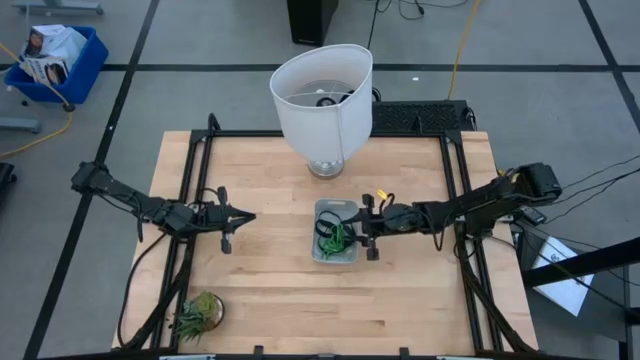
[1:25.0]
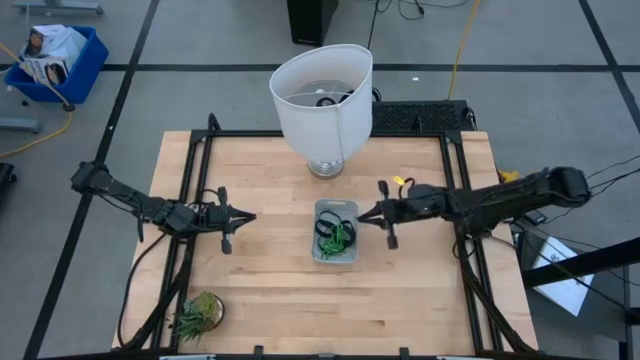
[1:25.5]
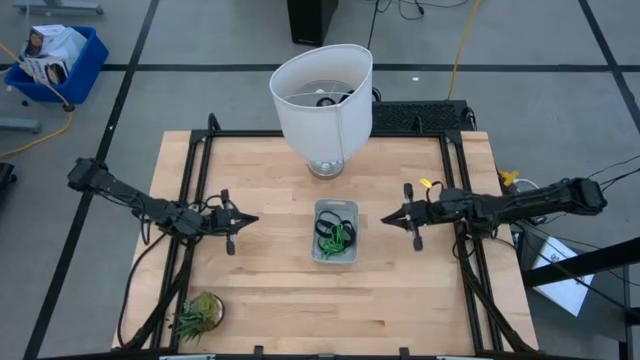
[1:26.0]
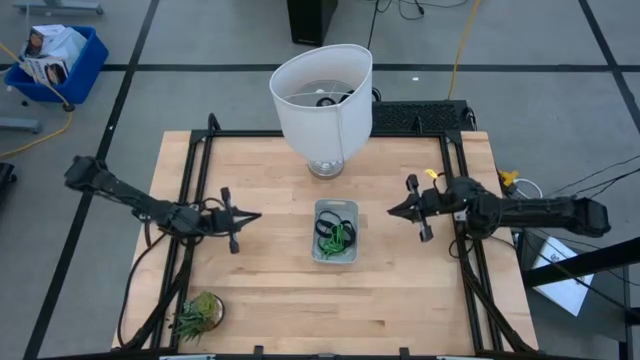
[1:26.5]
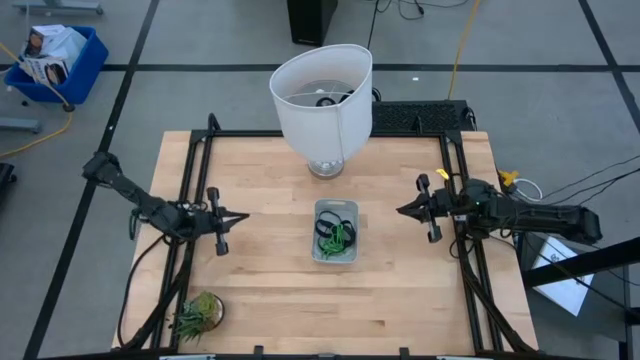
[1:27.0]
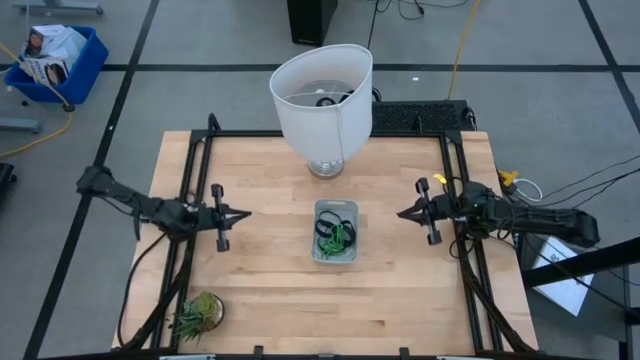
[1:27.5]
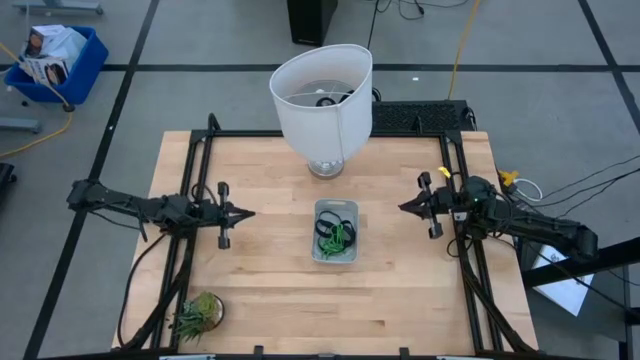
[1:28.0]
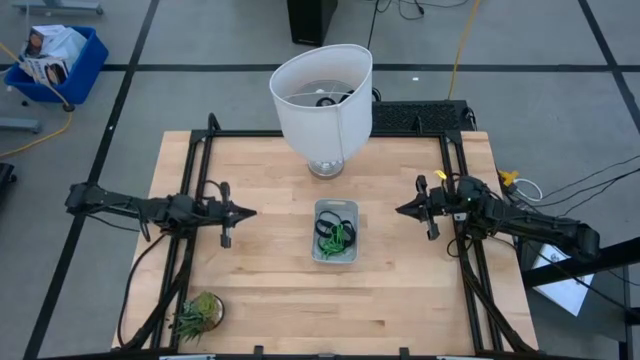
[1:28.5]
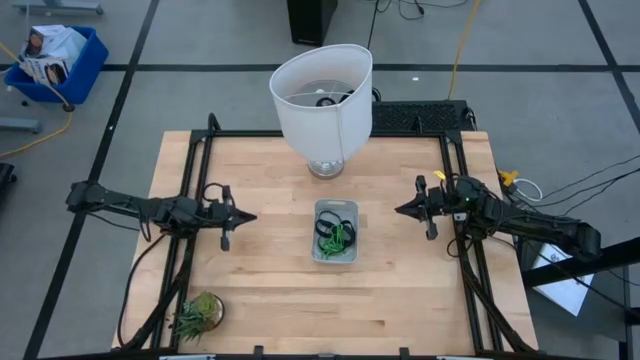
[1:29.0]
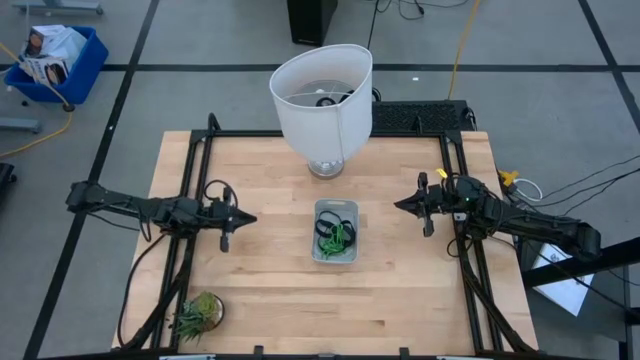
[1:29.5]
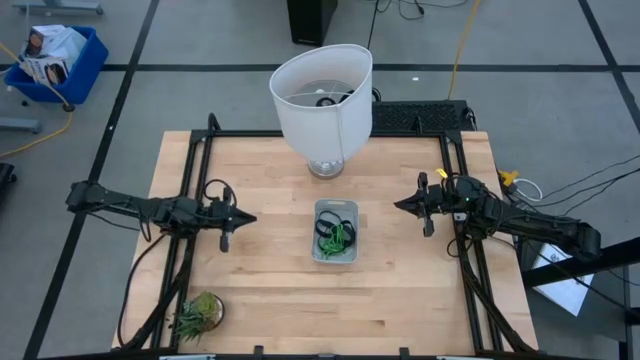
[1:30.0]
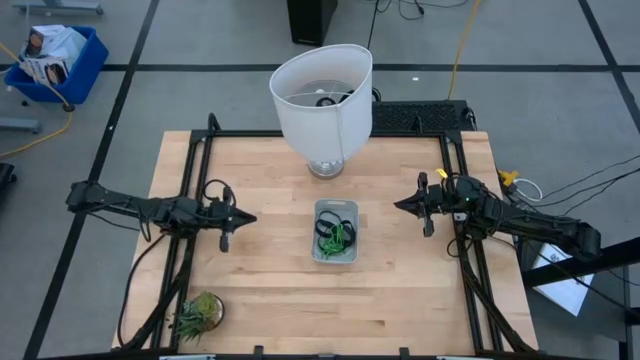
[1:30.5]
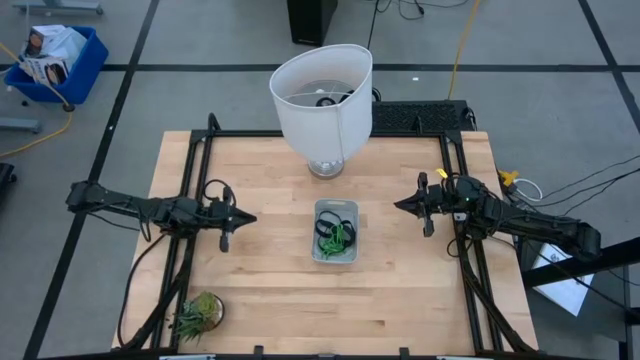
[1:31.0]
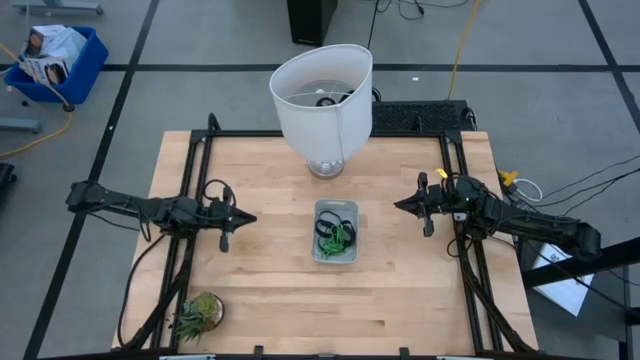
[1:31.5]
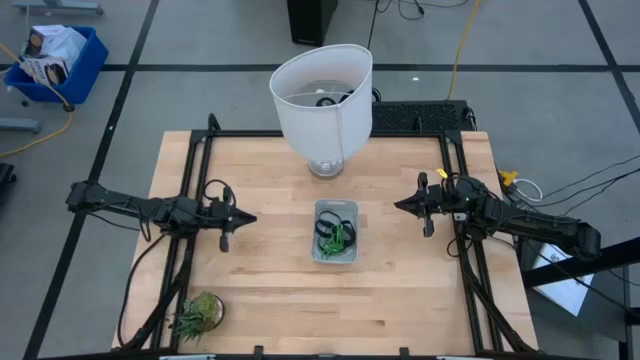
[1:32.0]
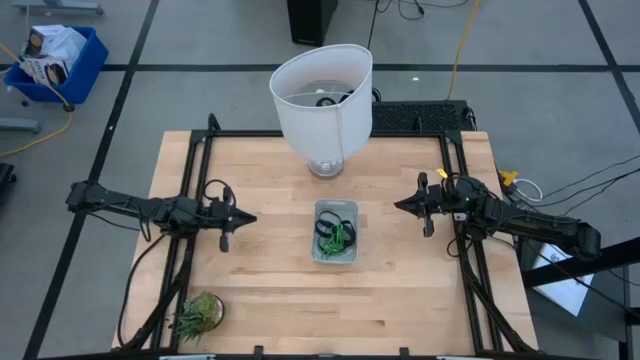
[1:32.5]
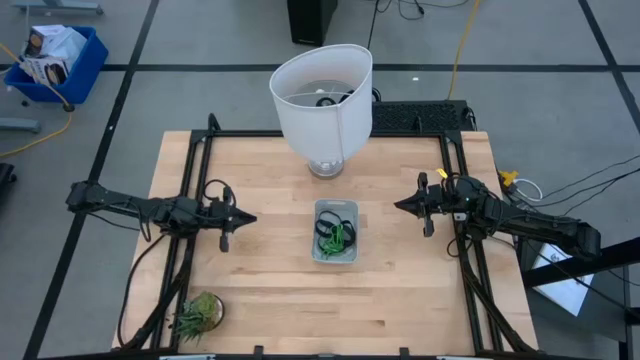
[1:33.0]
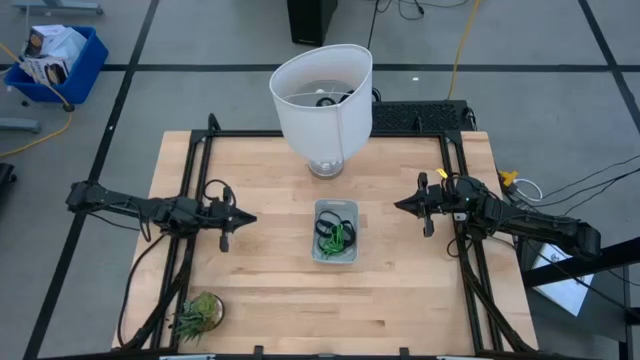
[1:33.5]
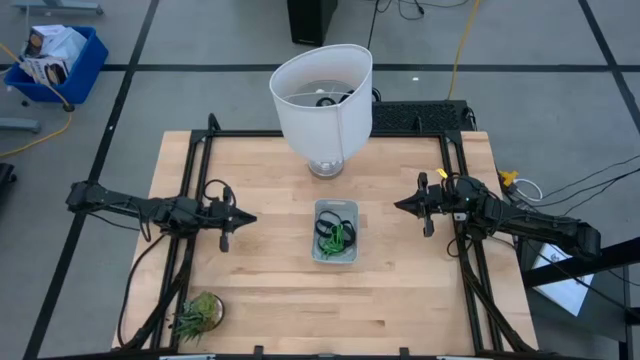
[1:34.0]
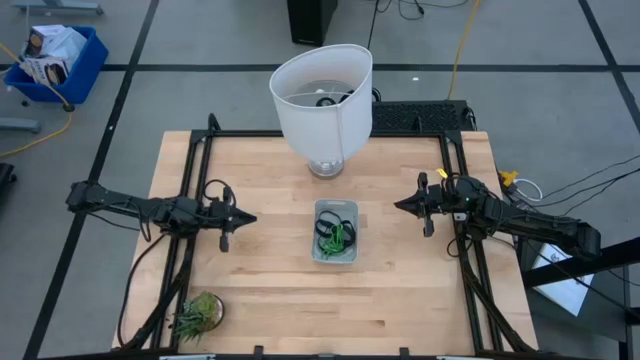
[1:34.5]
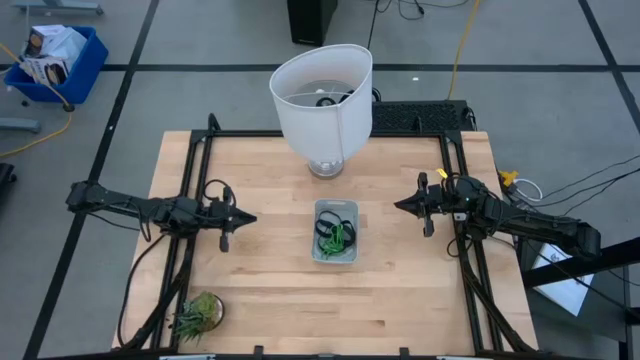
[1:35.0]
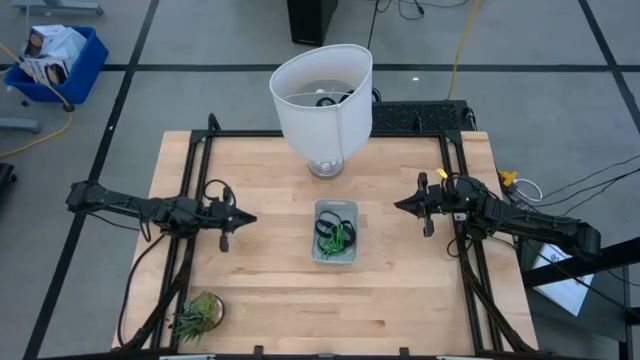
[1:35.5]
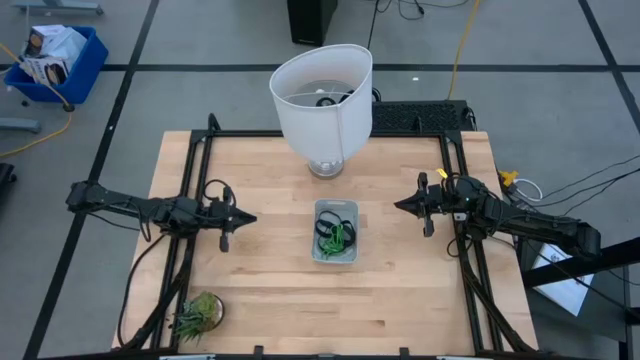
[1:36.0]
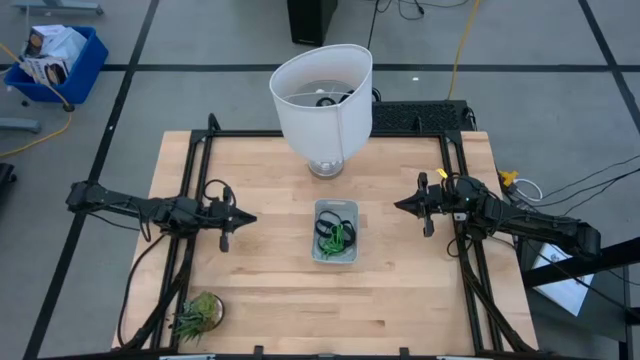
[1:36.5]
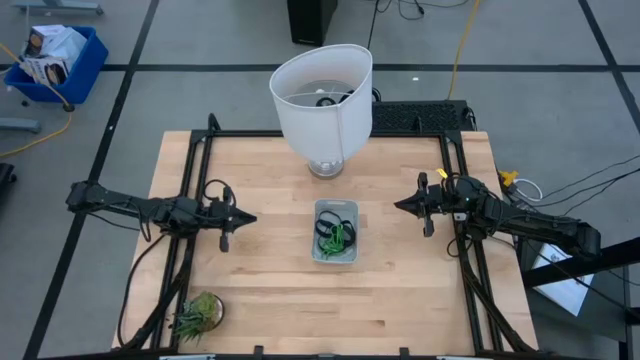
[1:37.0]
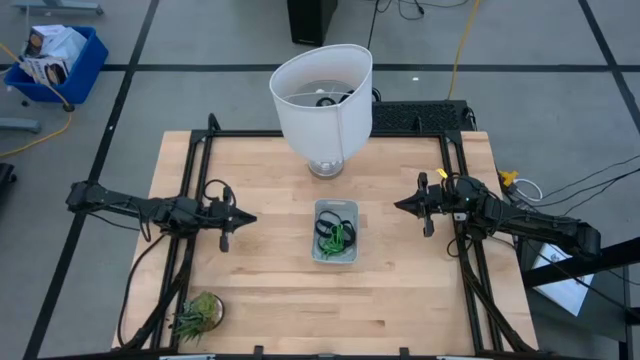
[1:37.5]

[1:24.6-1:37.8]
Task: Pick and place rubber bands into bin
Return to Home Position

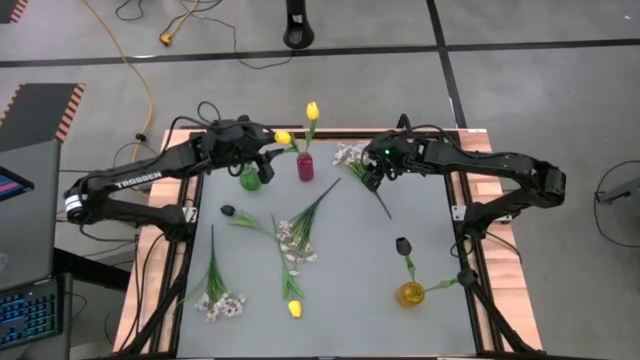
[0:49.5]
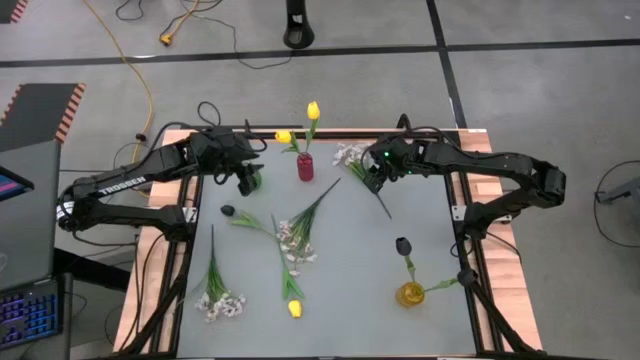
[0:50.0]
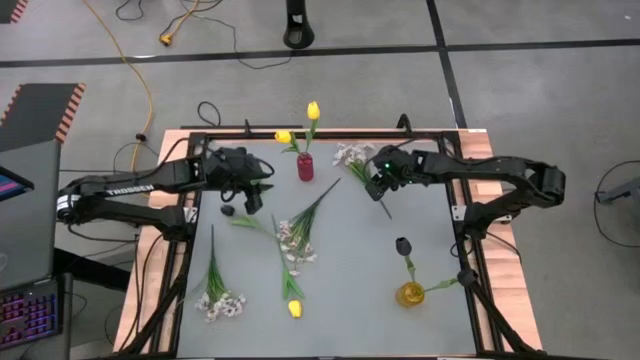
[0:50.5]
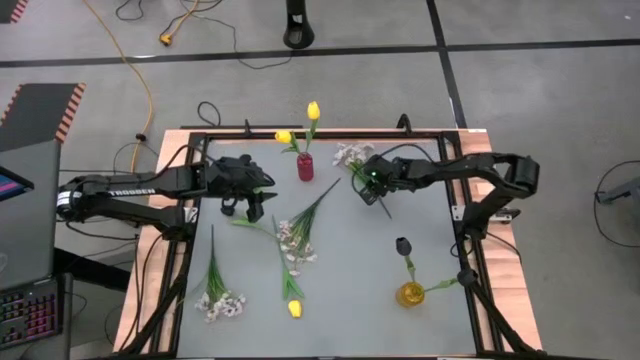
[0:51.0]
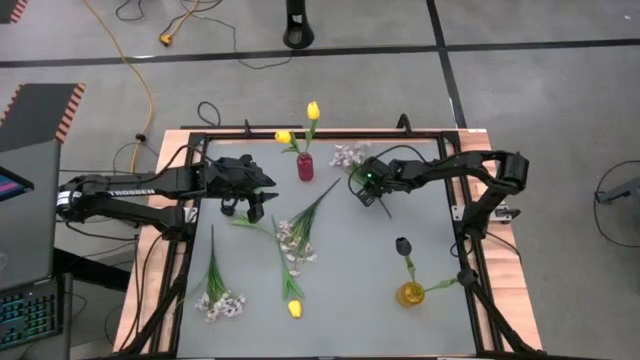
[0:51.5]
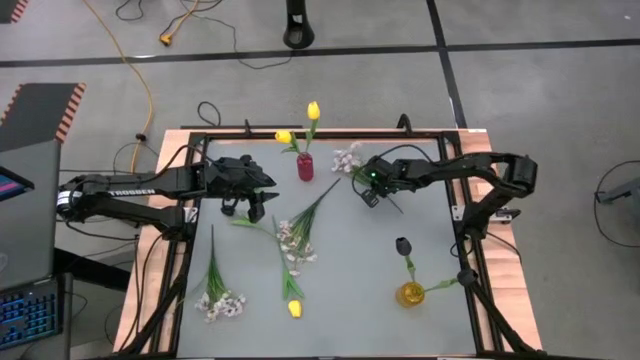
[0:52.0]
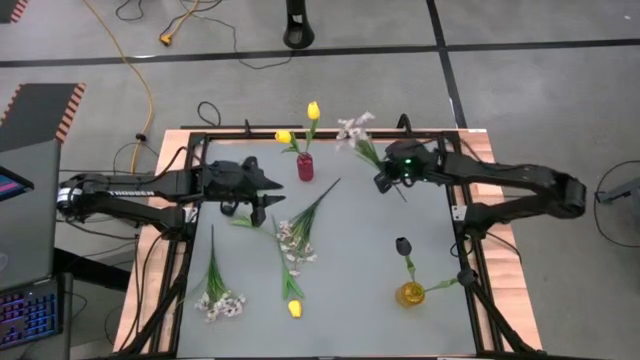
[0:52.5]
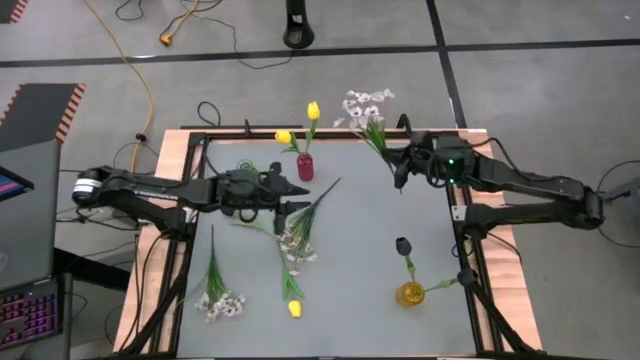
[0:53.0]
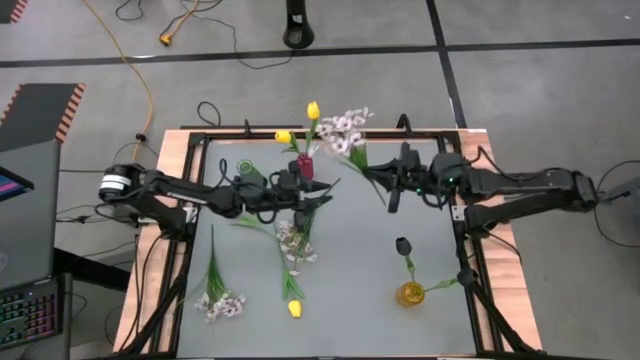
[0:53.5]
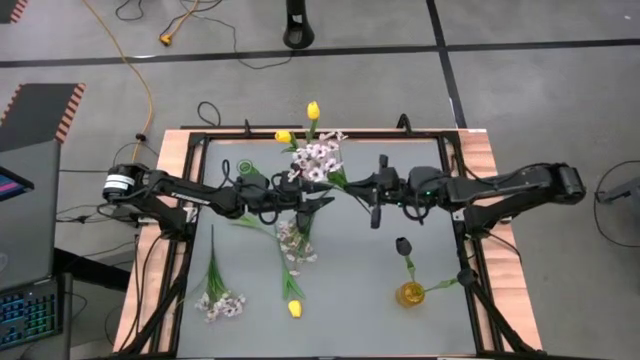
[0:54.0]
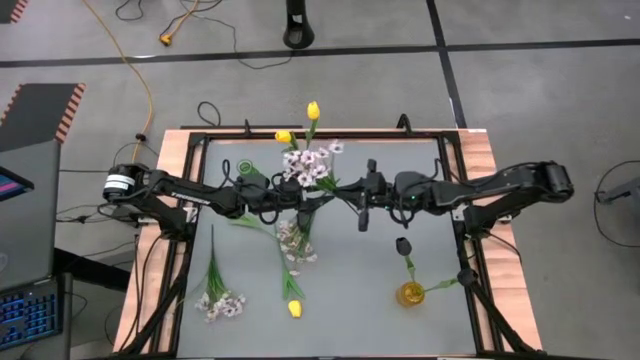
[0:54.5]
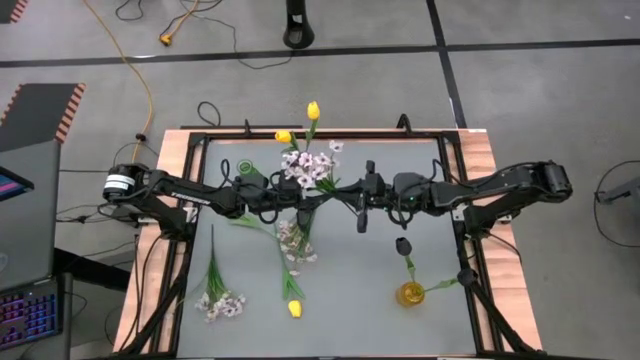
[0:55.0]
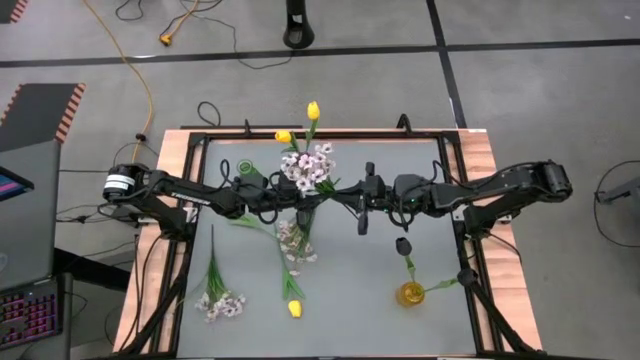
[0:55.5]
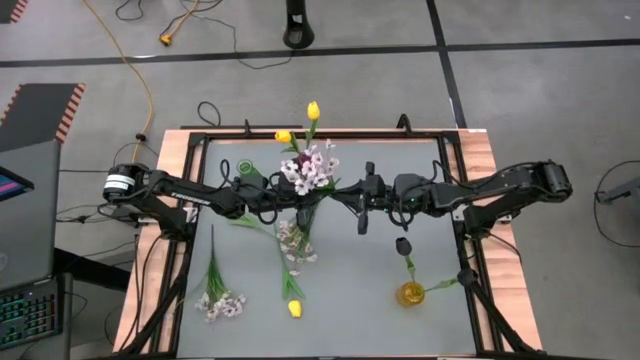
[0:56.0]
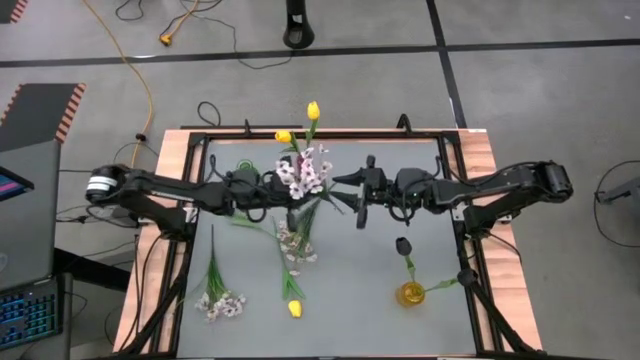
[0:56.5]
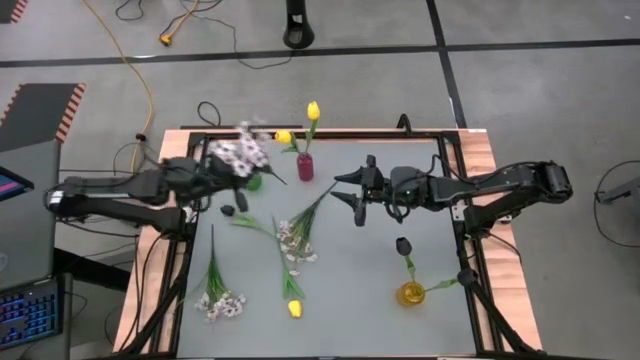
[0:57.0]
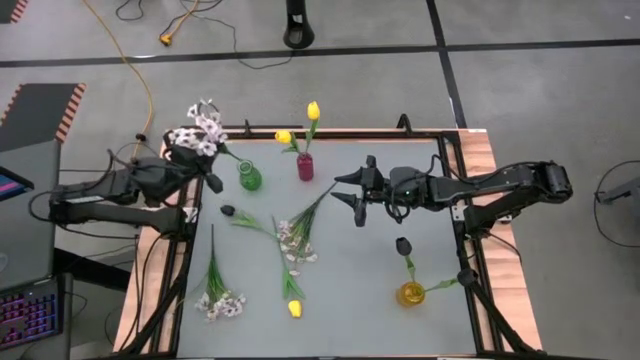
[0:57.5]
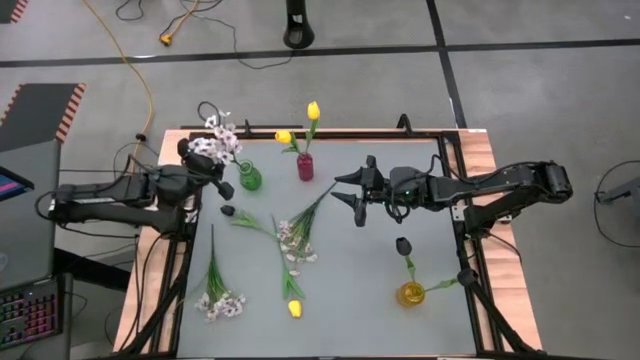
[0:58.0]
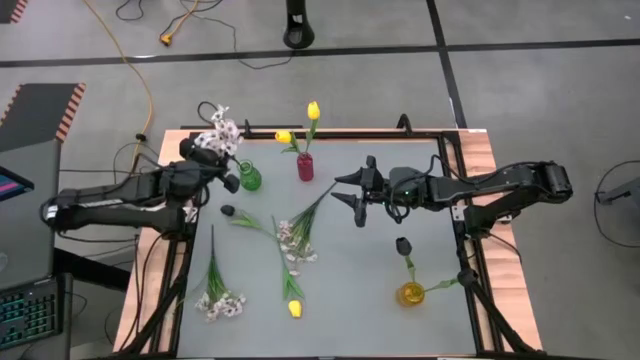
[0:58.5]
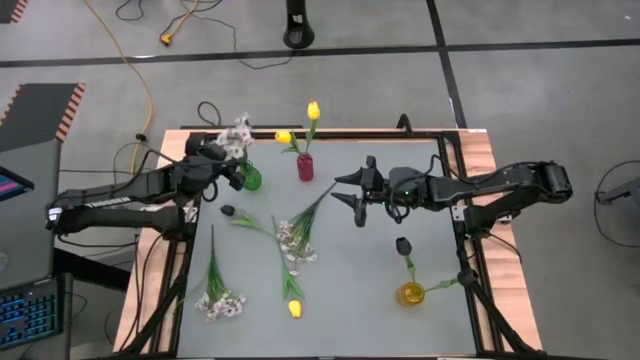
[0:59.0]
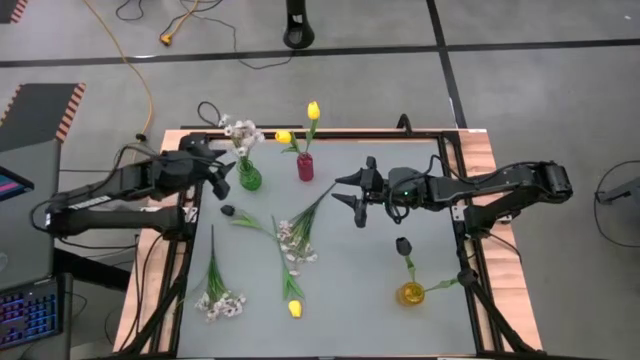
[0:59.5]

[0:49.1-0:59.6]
Task: Sort flowers into vase by color
Put the top white flowers into the green vase
